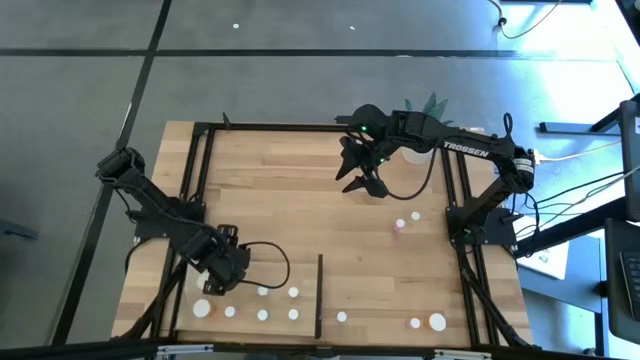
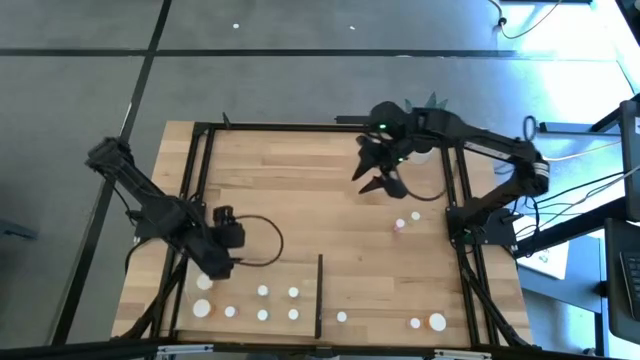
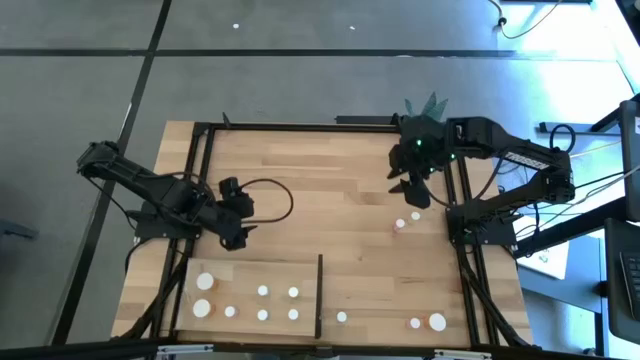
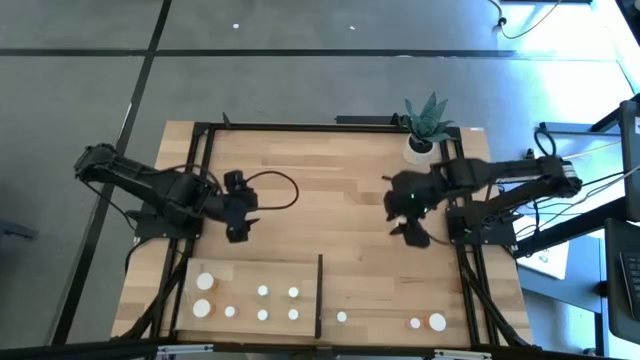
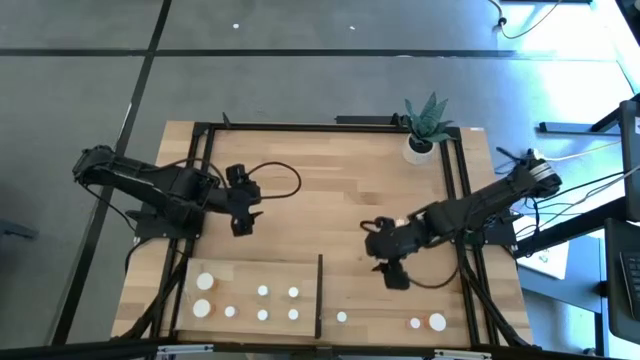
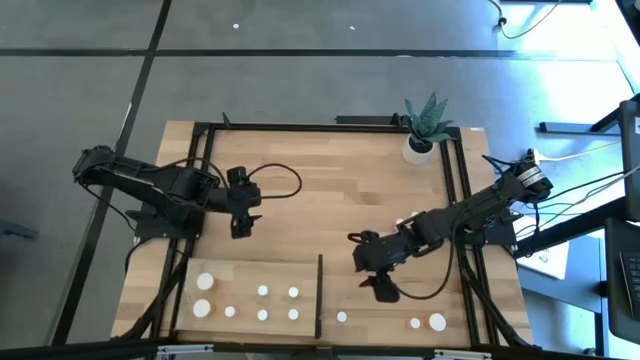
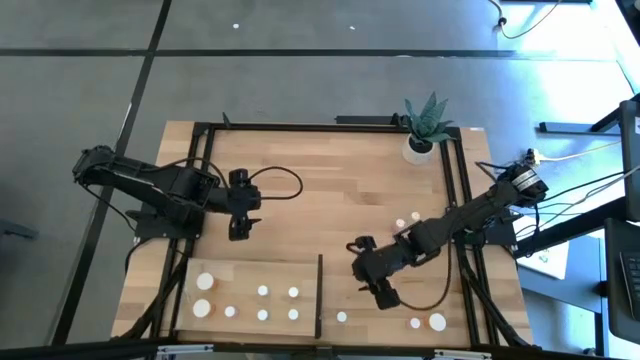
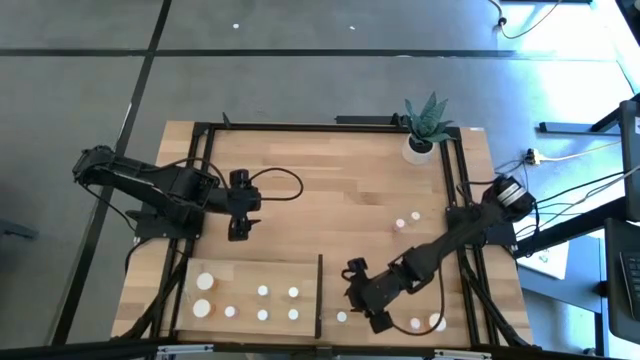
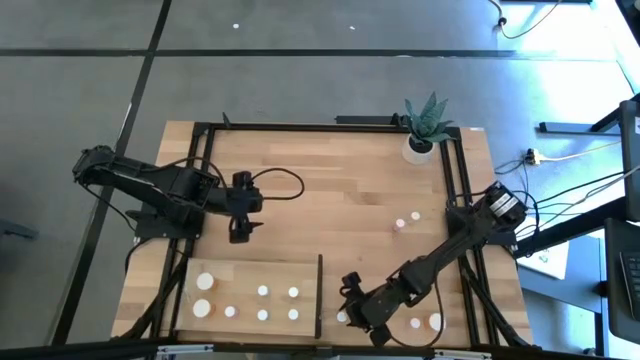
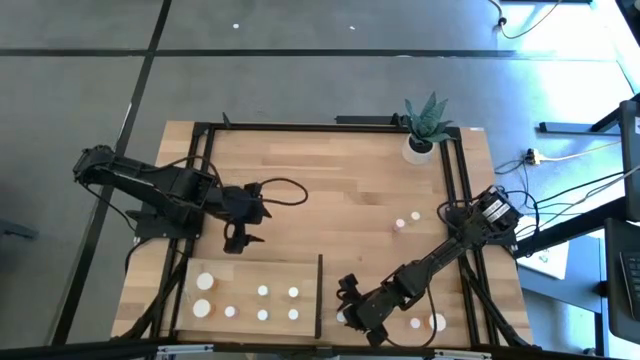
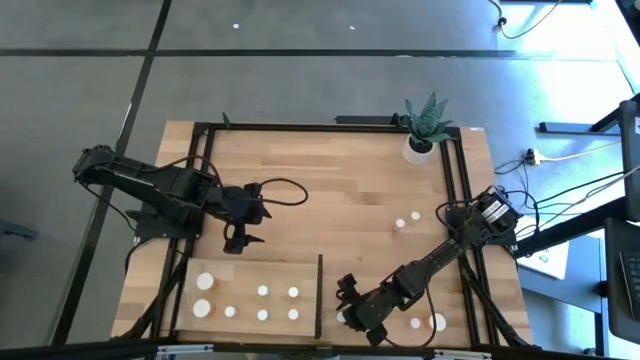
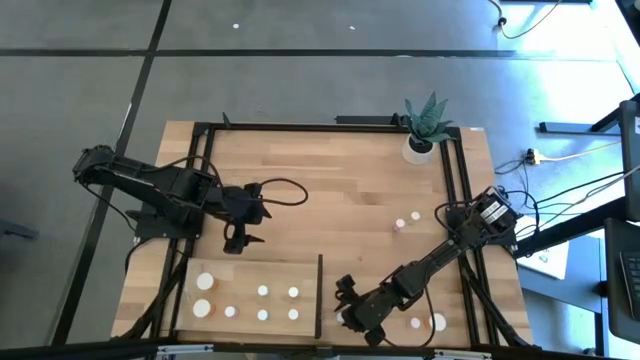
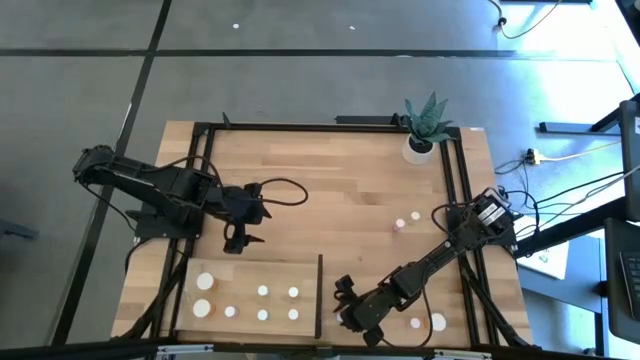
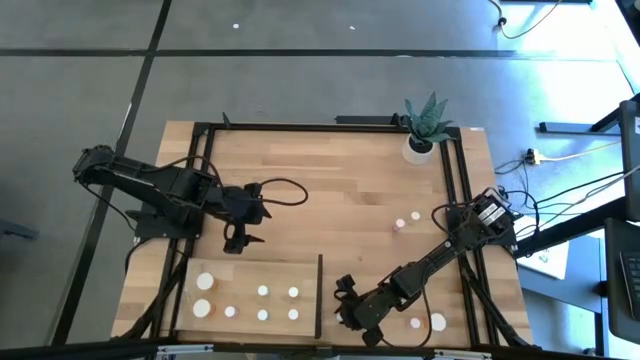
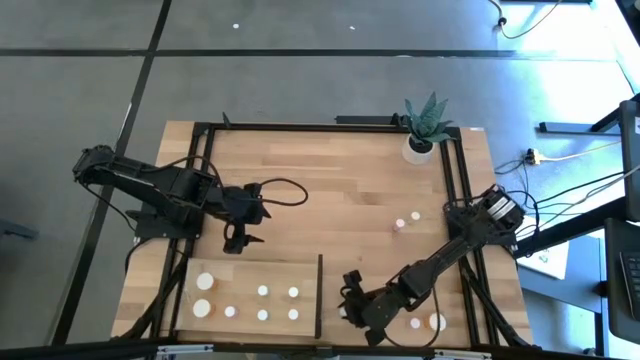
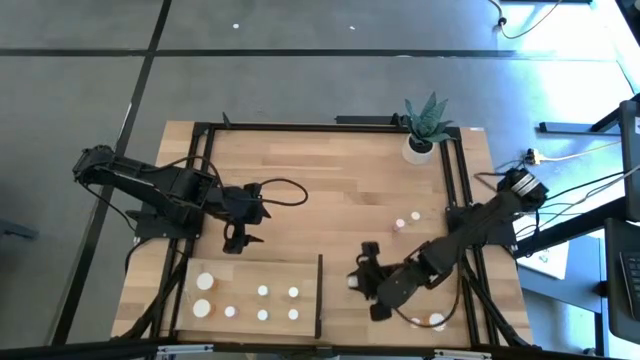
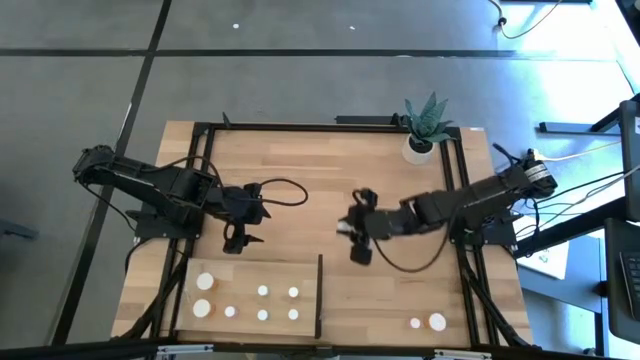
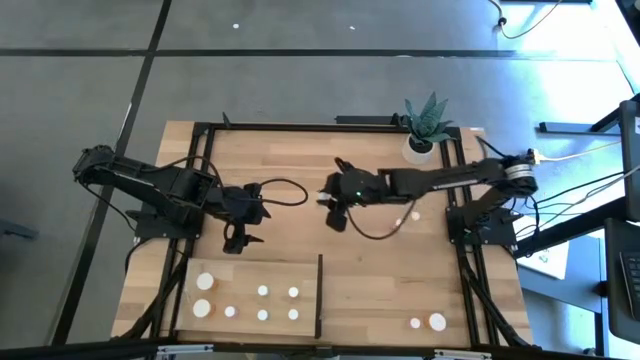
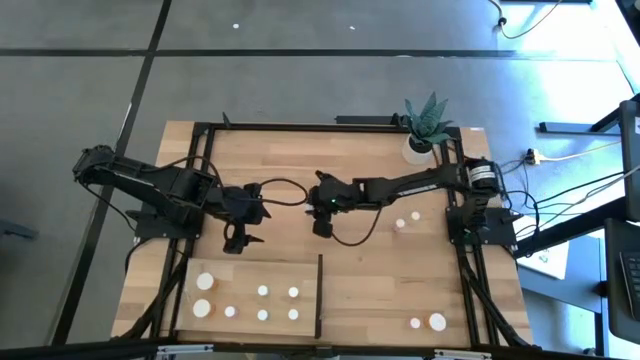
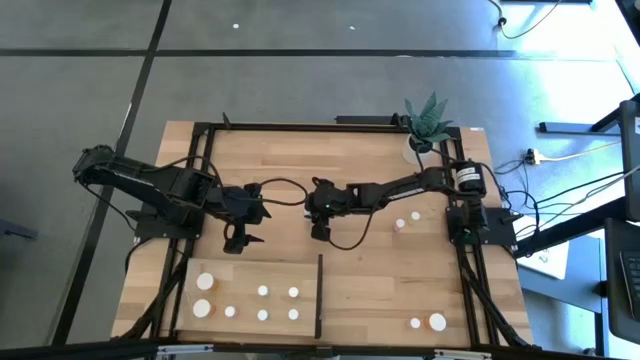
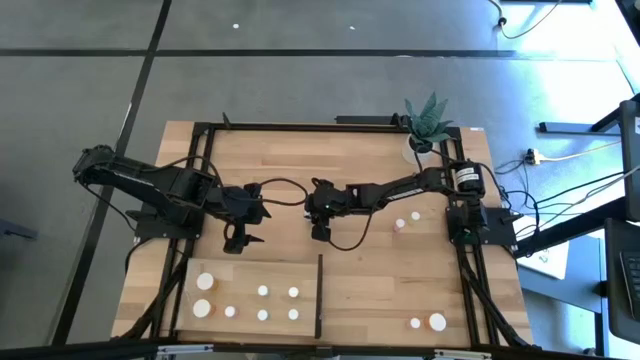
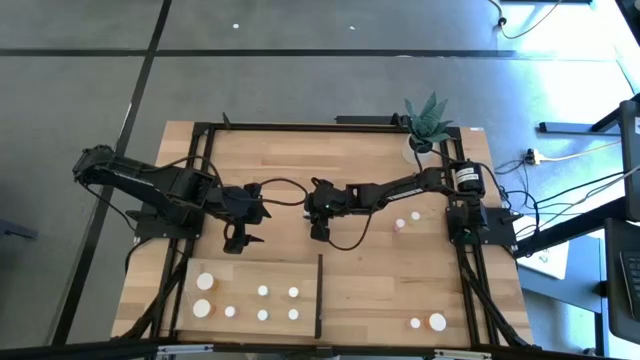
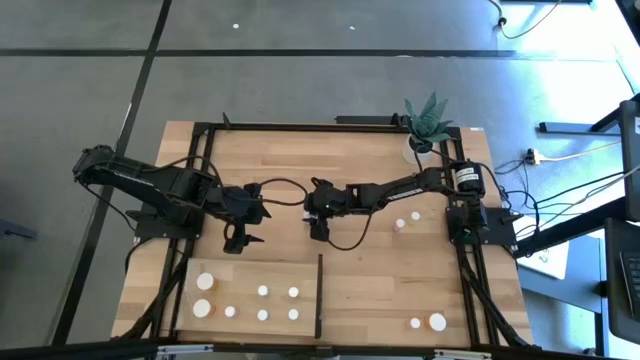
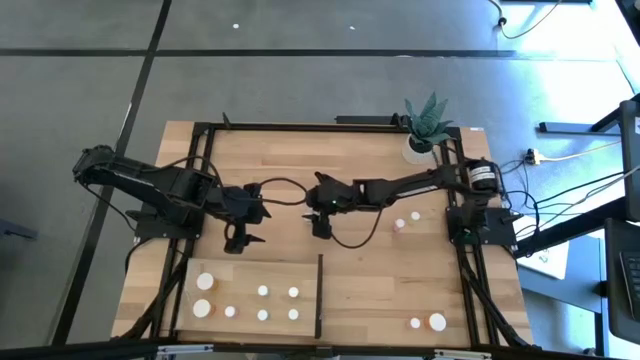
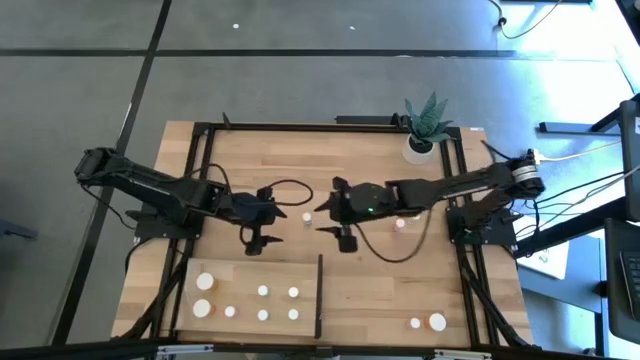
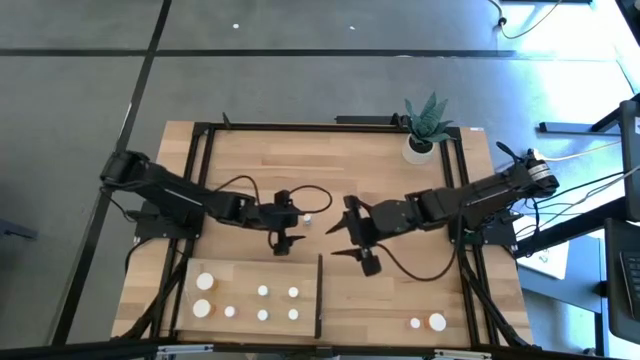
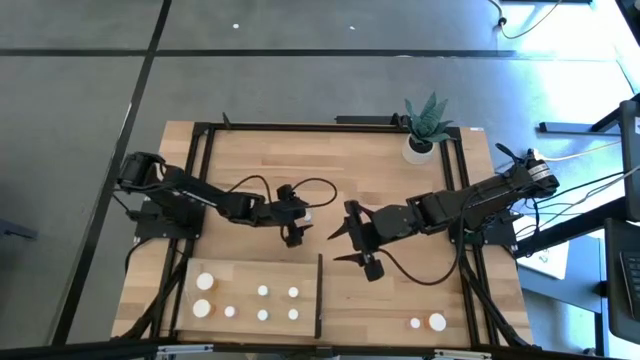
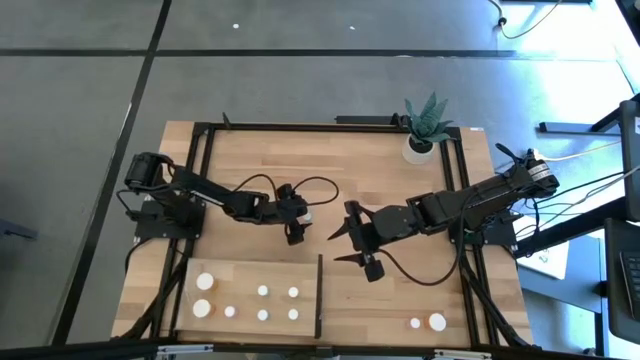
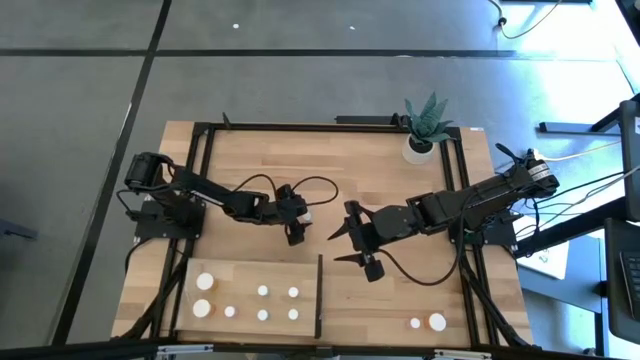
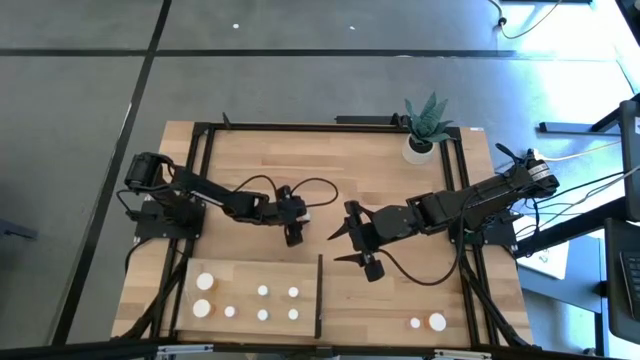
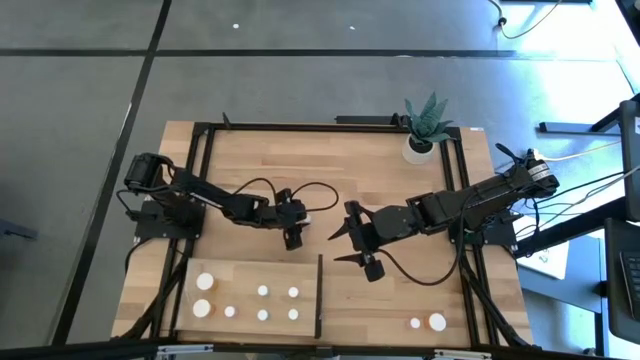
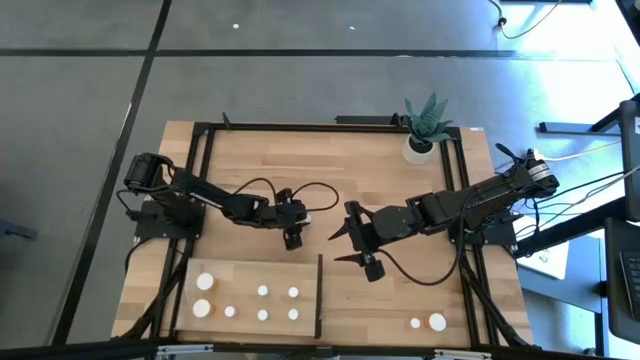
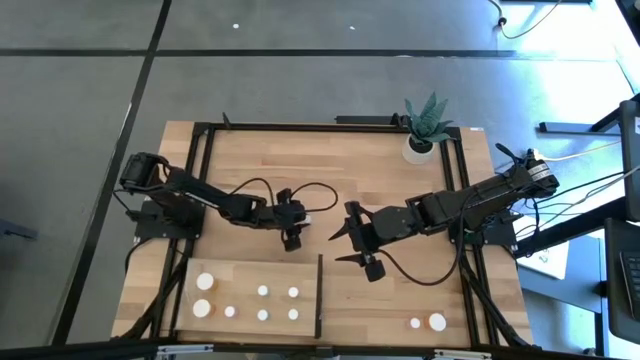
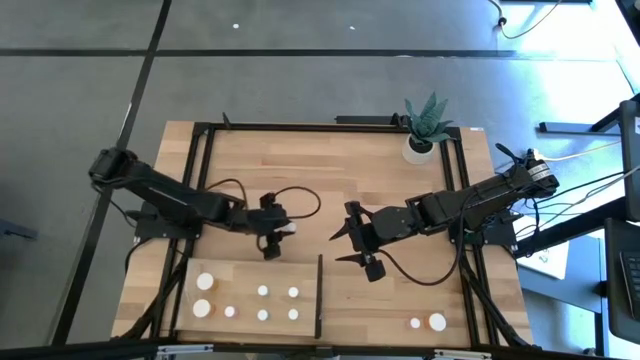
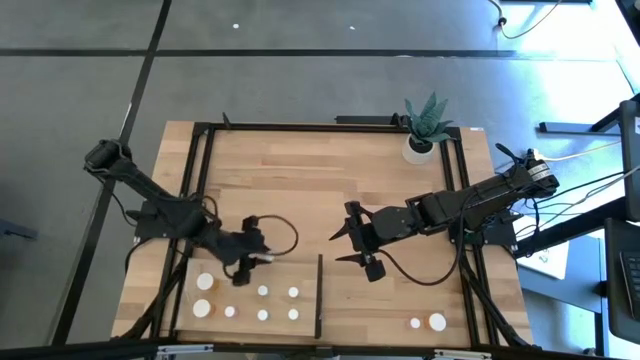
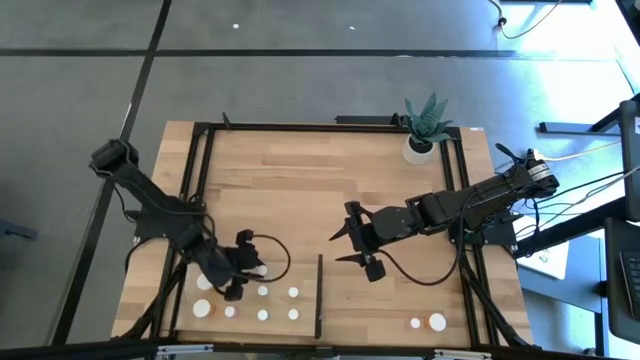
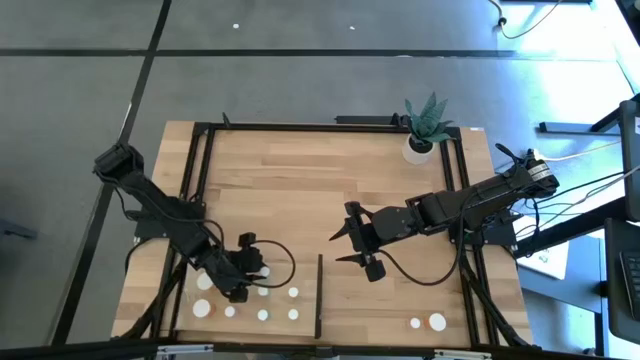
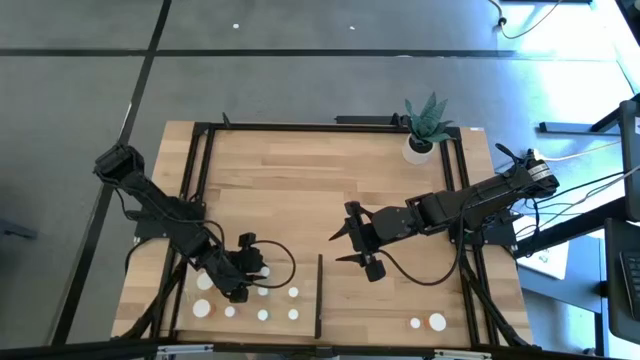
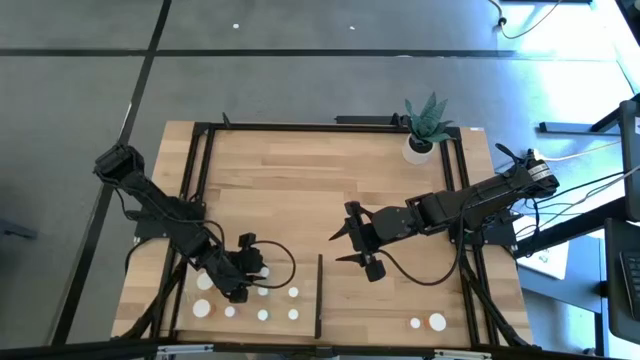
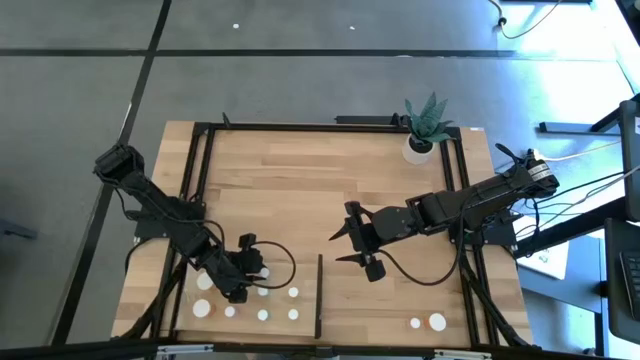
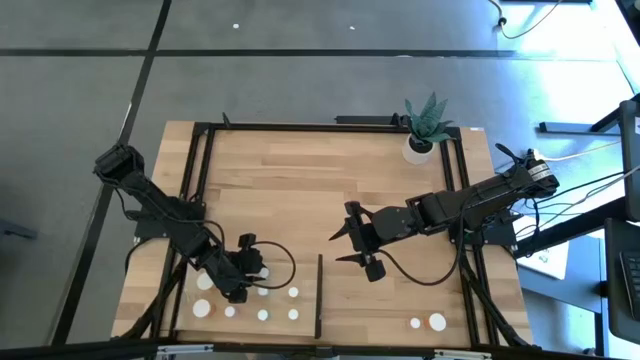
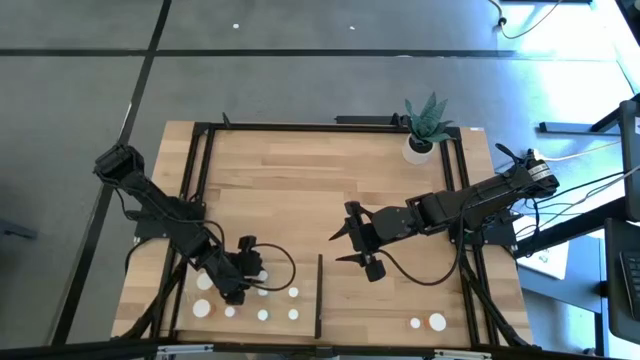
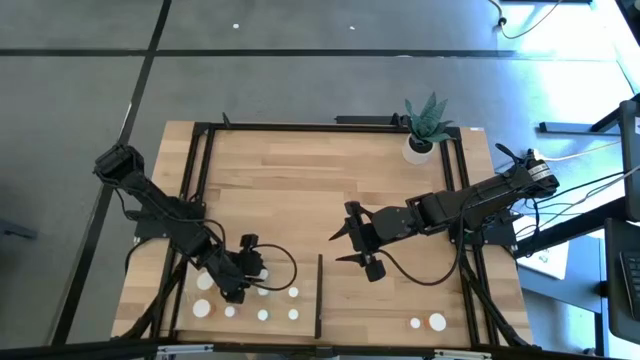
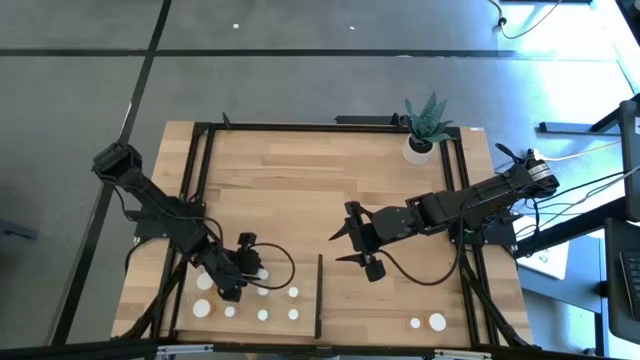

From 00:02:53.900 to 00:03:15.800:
Task: Pick and place medicine bottles onto shelf by color
Put the blue pill bottle on the shelf aligned with the other blue pill bottle
